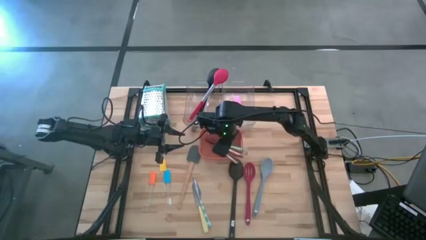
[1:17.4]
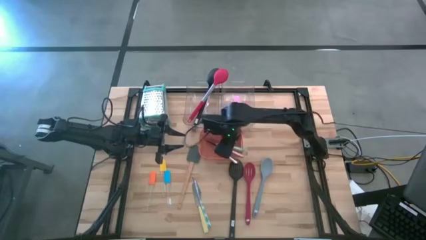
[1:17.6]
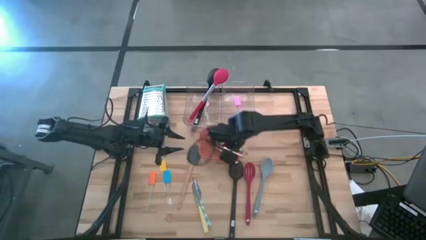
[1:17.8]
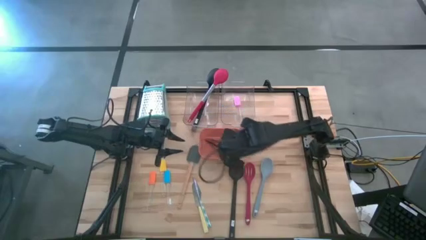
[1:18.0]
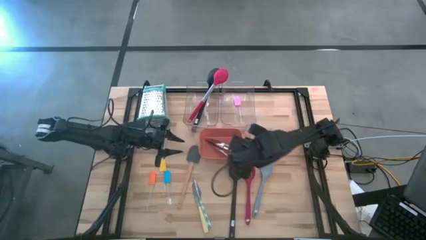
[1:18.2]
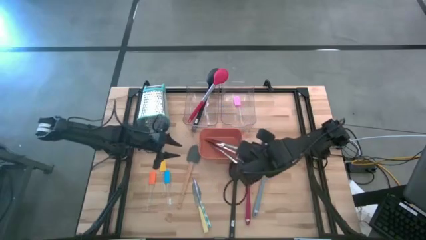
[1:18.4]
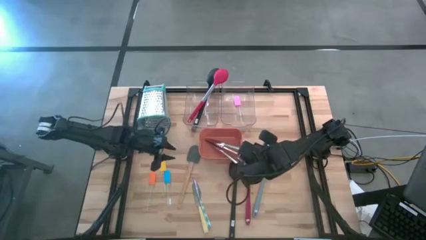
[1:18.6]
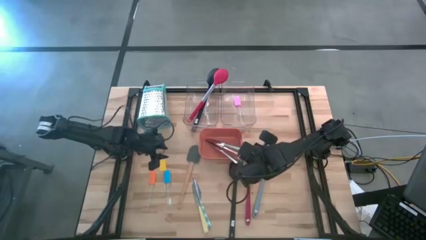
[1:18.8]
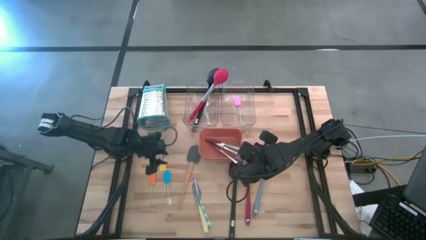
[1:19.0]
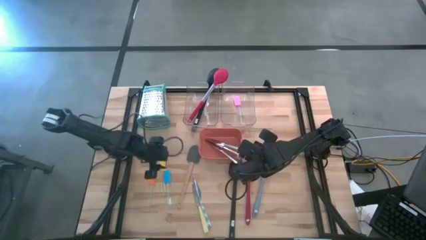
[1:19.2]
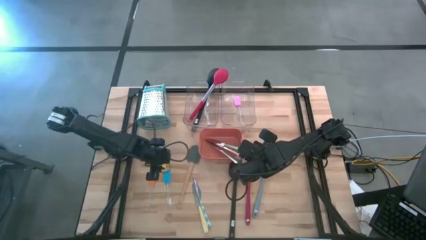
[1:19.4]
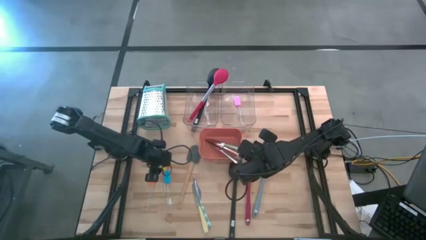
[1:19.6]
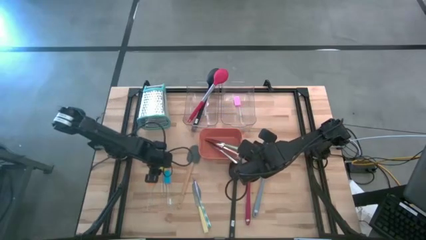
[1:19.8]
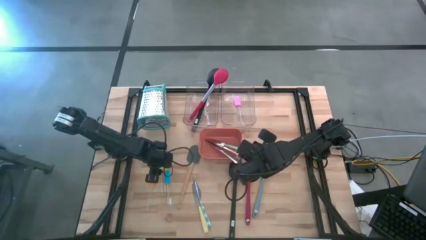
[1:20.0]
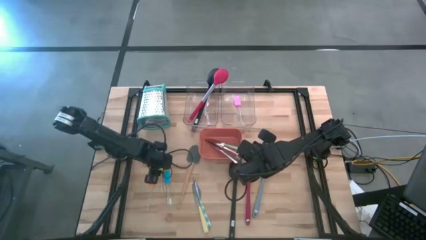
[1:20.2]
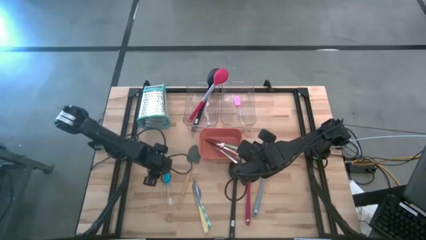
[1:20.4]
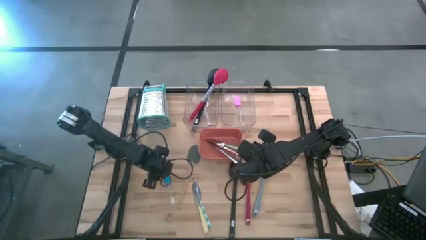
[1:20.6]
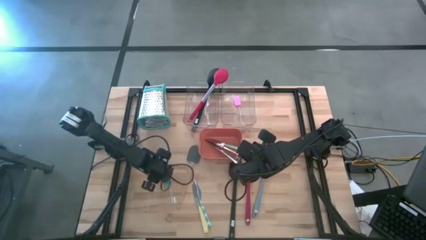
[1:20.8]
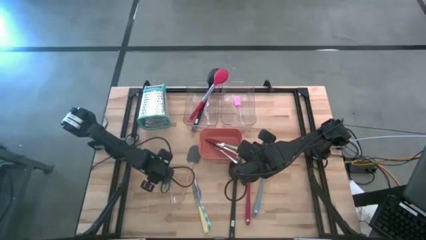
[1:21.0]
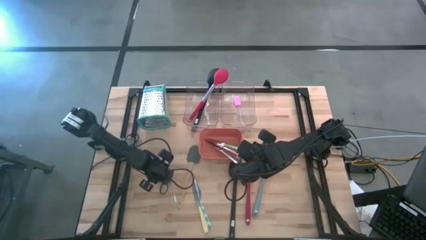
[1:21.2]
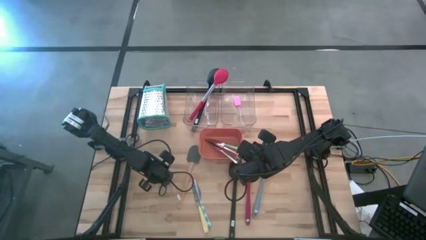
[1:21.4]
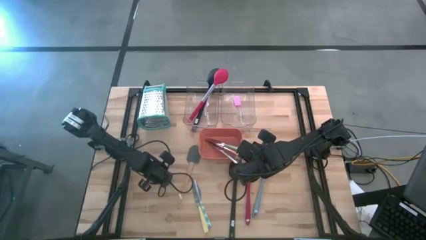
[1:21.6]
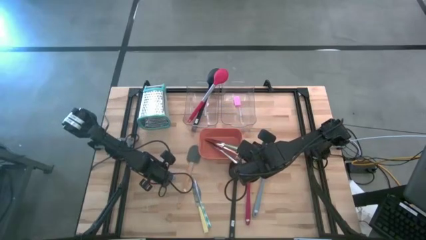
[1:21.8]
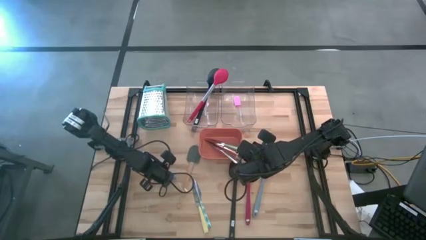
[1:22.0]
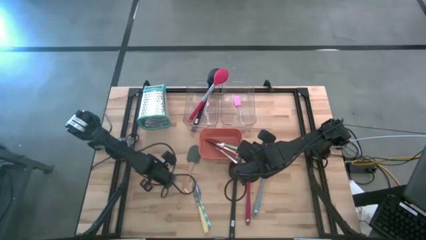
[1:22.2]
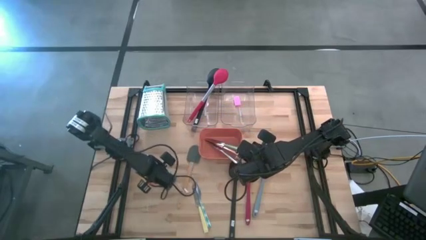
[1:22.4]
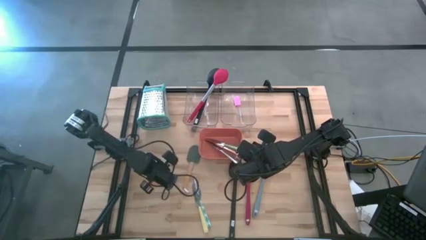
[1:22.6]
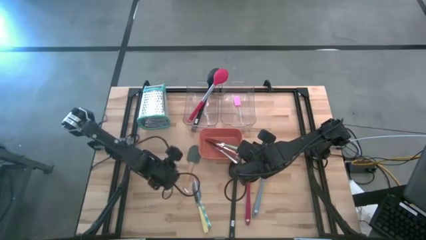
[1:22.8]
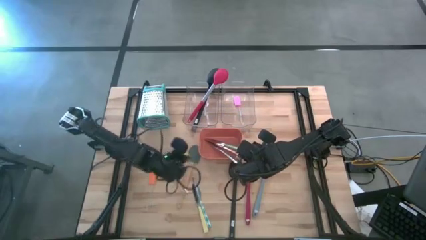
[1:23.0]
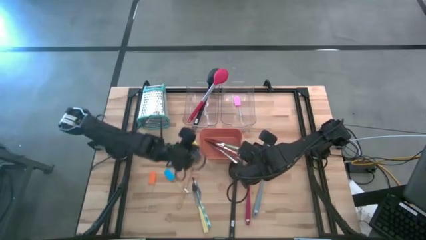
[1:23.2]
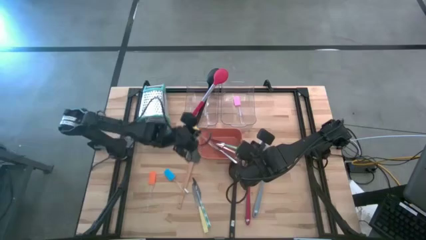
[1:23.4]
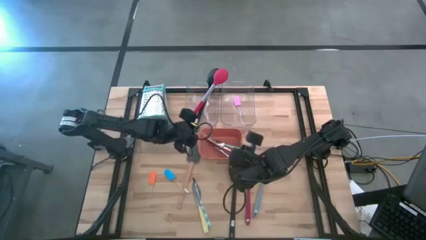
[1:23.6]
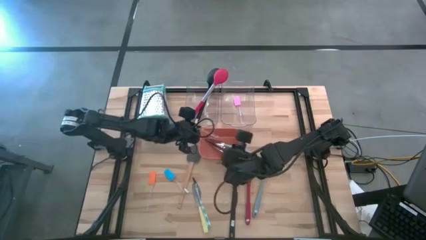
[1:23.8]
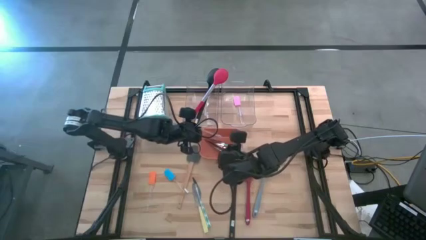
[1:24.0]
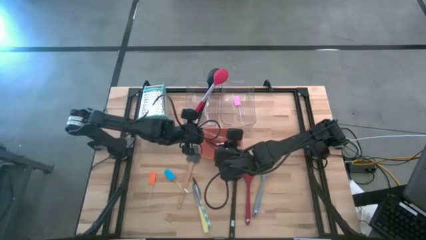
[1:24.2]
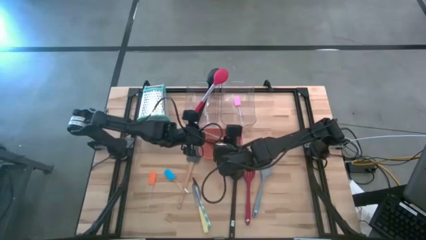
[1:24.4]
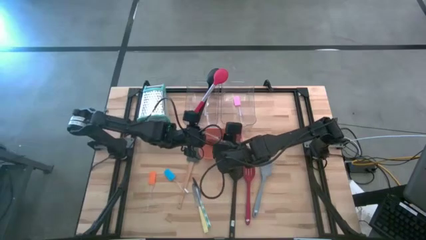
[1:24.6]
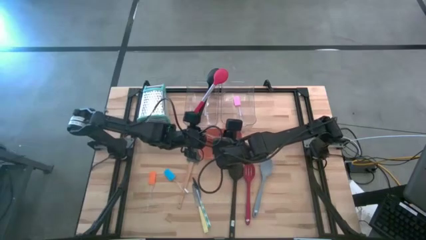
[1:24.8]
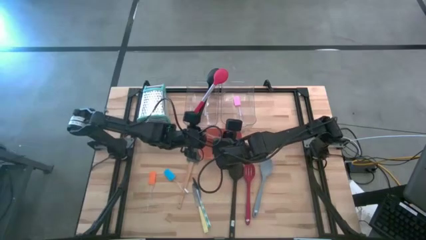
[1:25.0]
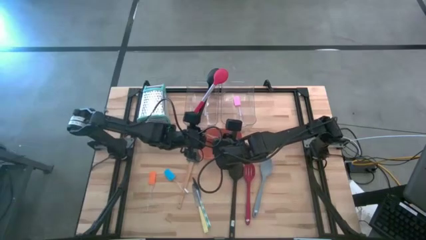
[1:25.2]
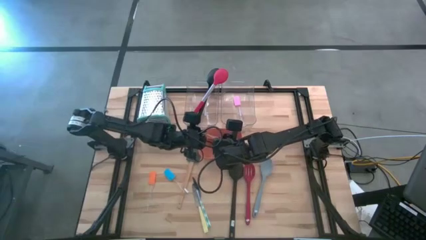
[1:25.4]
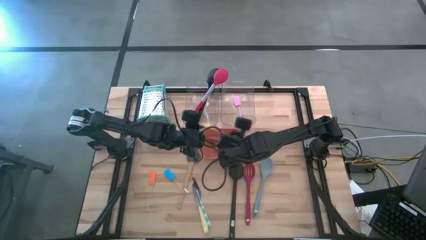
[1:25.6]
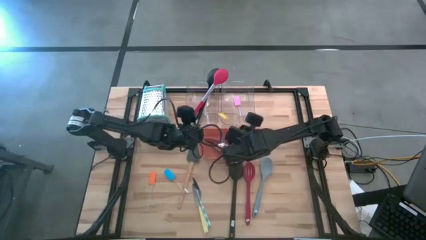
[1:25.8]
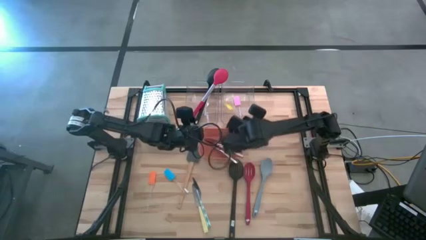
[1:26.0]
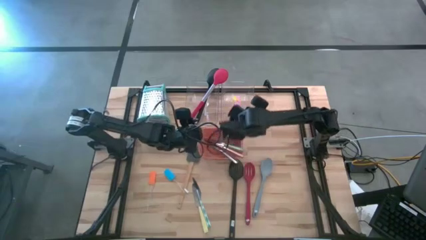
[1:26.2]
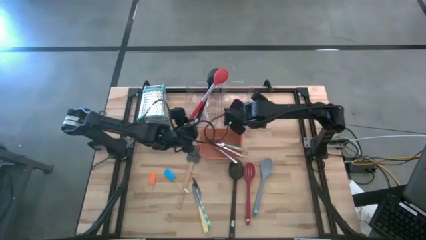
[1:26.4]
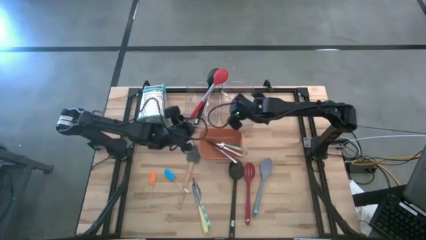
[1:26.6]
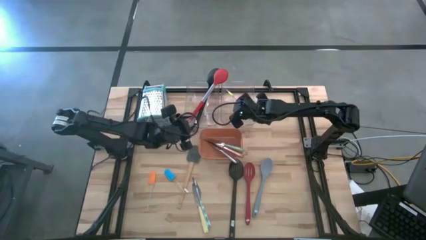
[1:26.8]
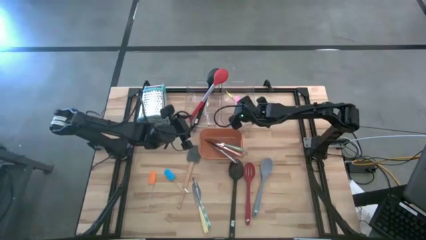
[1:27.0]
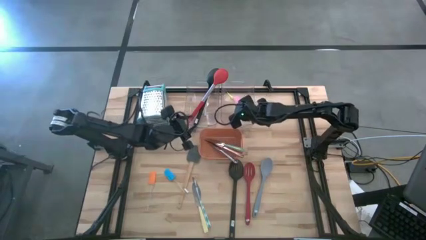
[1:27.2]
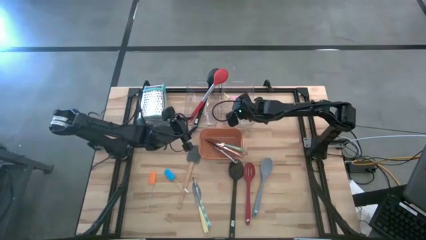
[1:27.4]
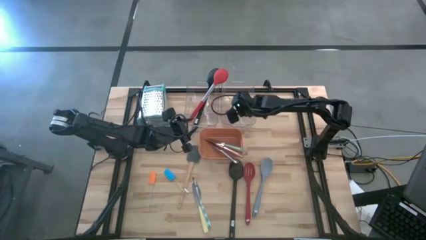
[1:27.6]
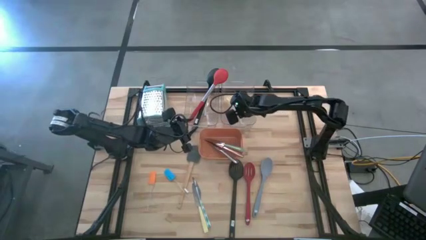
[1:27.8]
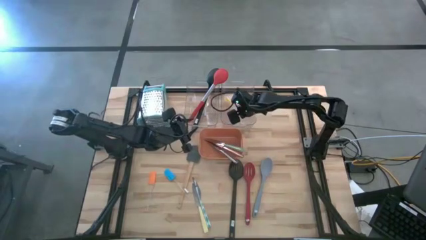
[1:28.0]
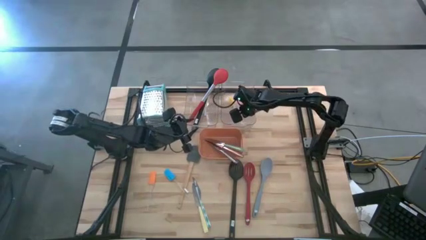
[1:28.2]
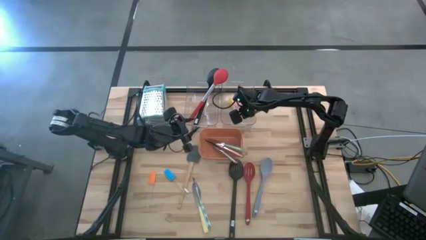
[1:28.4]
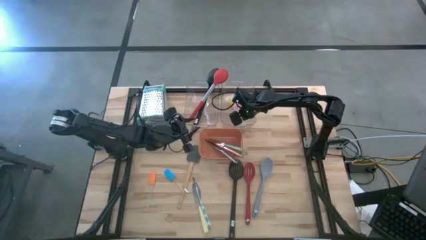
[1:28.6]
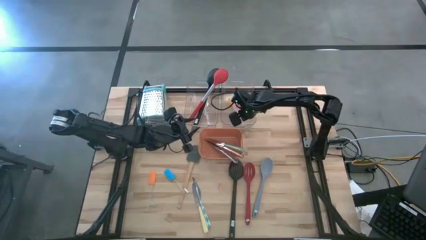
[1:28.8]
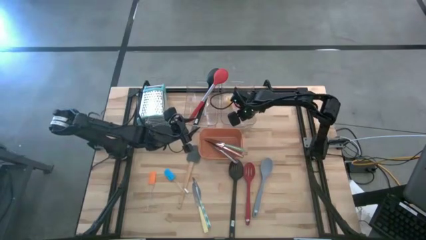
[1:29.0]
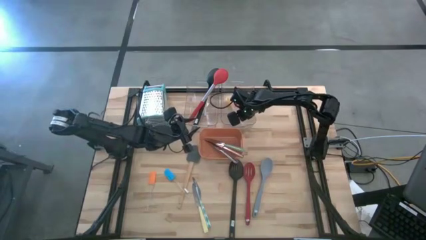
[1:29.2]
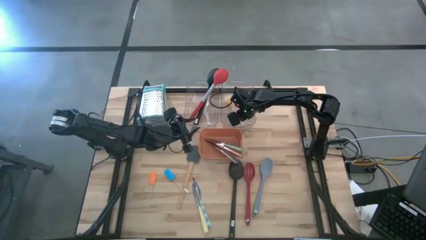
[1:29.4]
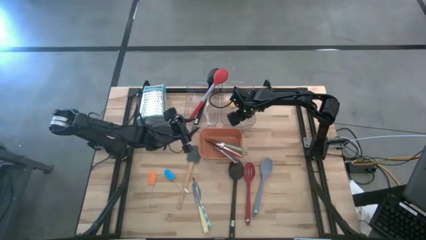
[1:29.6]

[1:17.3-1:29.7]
Task: Pick & Place Kitchen Items
Put the yellow spatula into the right transparent bin

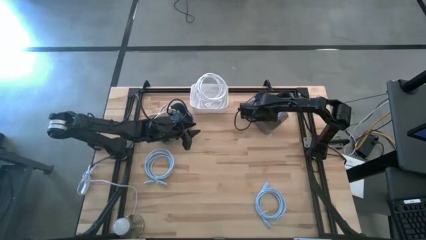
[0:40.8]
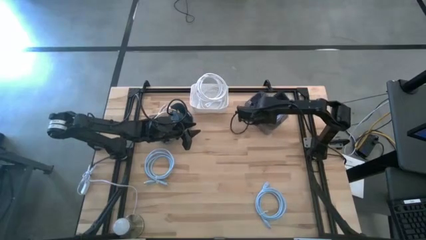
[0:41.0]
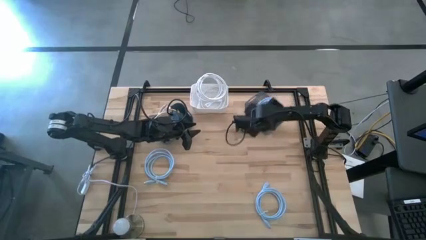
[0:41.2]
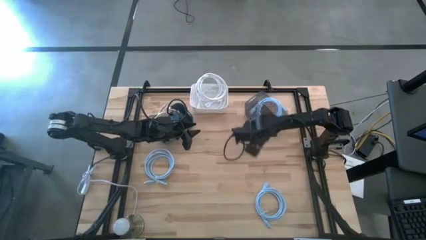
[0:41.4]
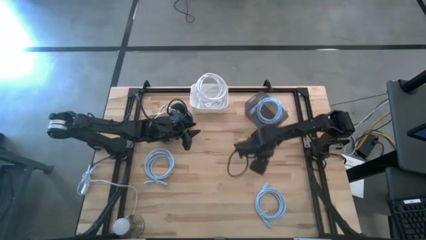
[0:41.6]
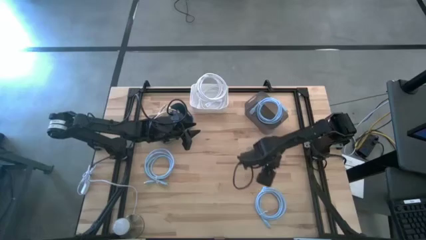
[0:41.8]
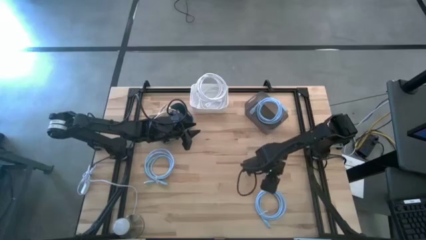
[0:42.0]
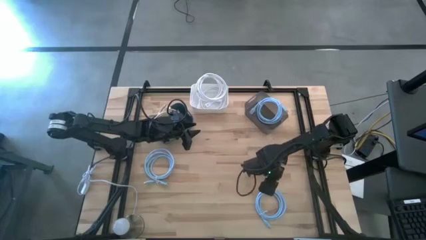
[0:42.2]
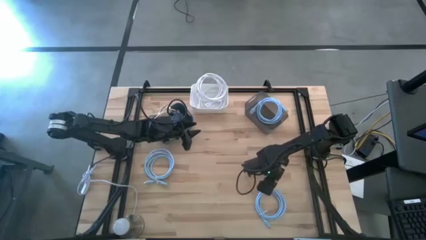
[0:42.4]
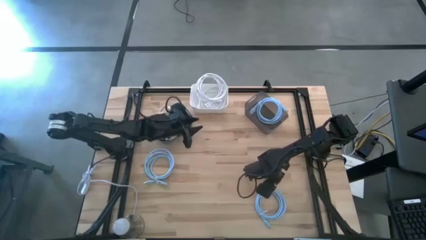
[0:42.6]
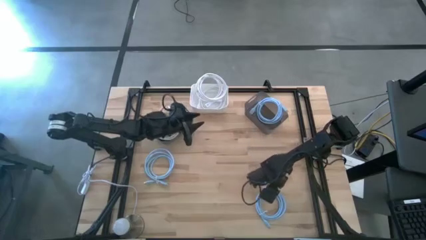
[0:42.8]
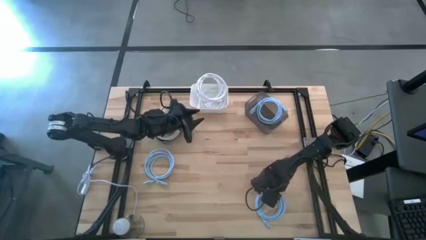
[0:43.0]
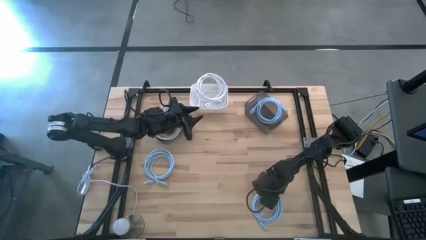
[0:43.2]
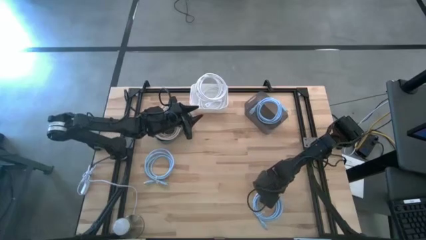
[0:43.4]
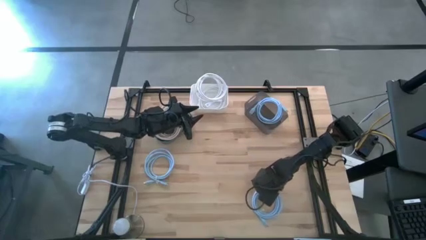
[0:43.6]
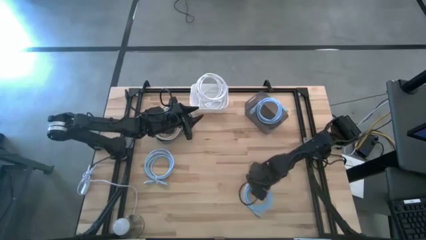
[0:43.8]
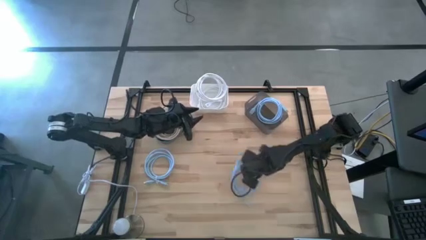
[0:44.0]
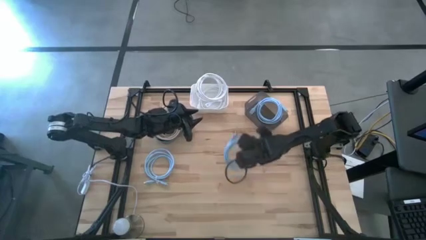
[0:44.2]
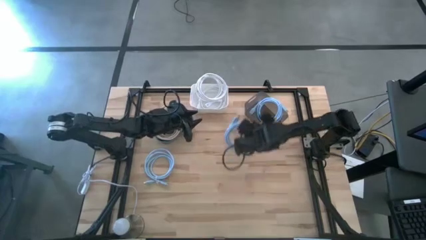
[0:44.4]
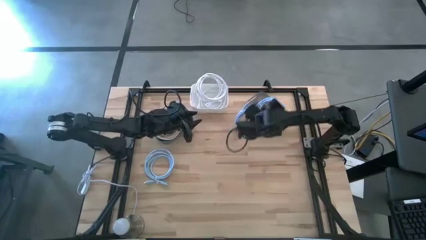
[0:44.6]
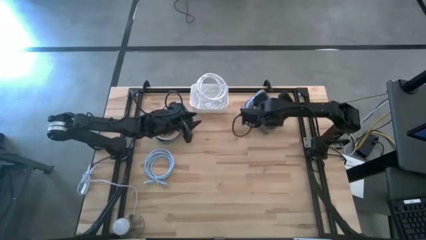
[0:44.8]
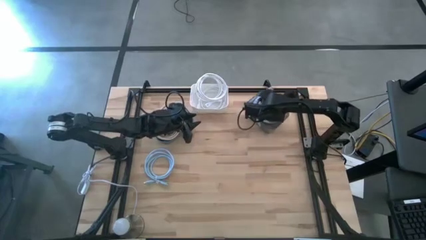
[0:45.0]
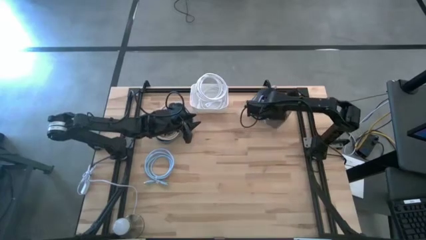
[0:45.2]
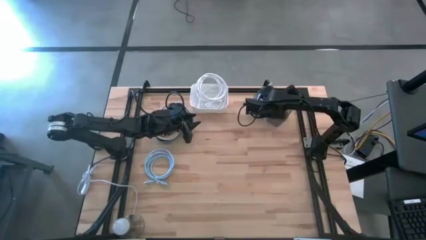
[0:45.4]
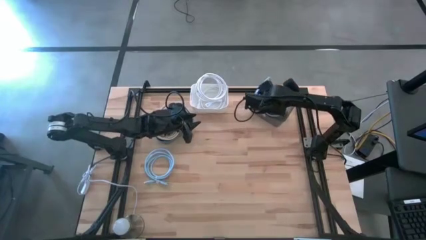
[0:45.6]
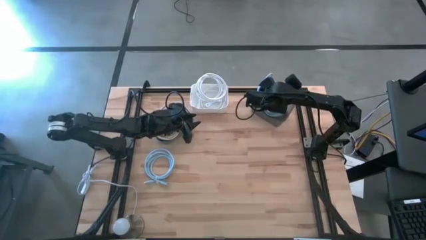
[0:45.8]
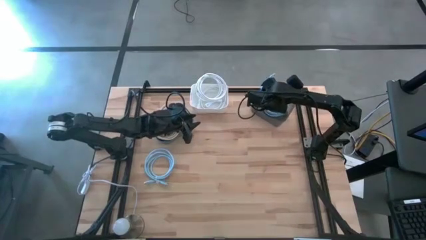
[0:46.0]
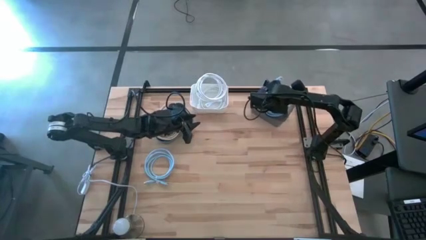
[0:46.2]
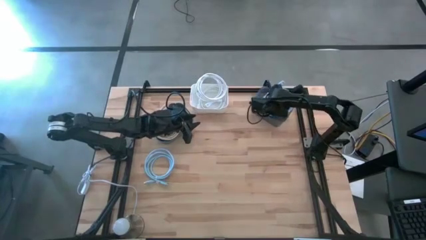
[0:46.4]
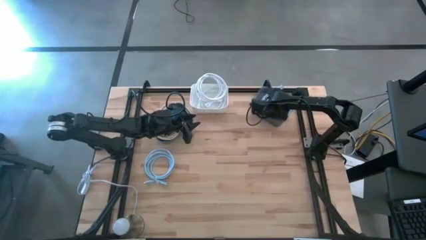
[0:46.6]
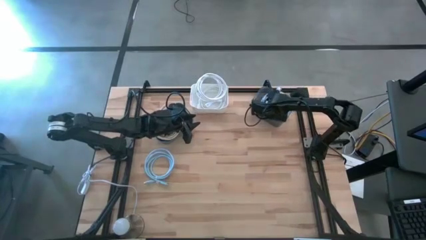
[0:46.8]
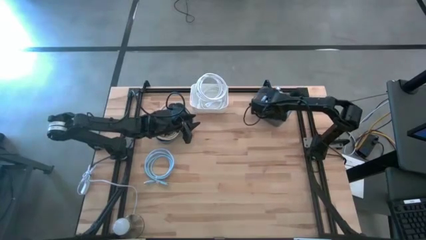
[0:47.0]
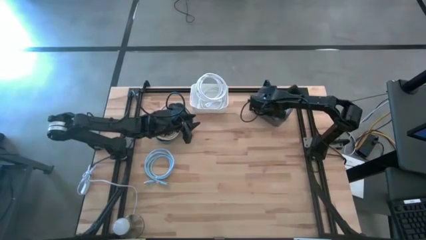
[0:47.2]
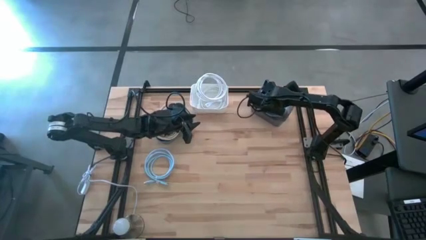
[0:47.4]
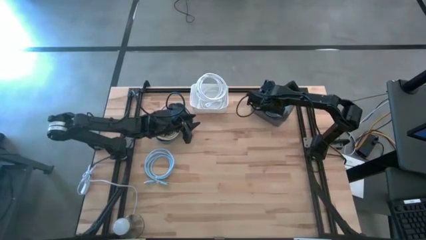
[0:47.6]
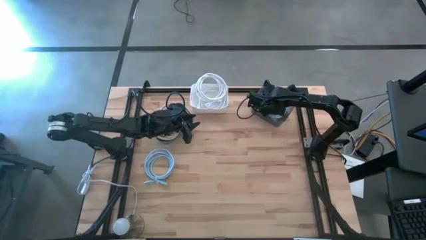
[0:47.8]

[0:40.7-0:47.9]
Task: Sort HDMI cables
Put the right light blue HDMI cable into the black bin
